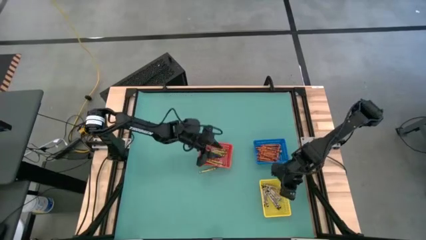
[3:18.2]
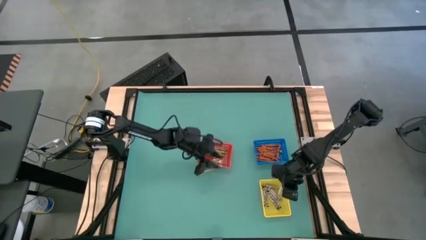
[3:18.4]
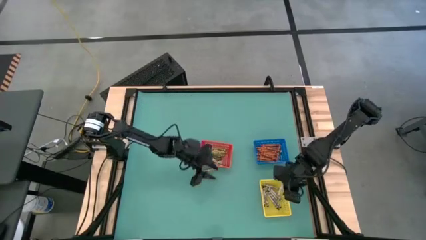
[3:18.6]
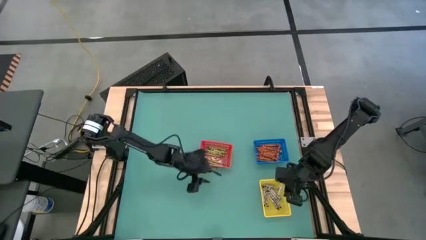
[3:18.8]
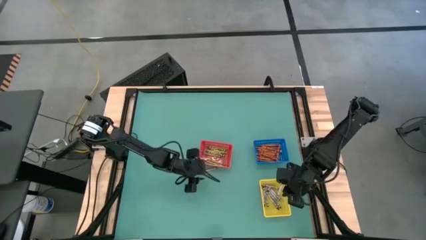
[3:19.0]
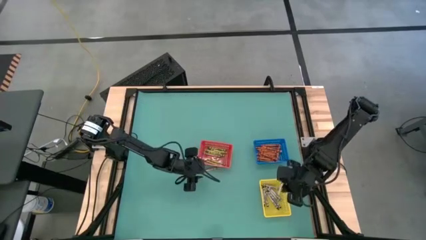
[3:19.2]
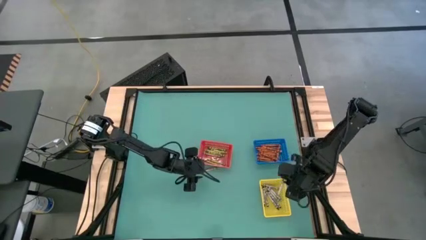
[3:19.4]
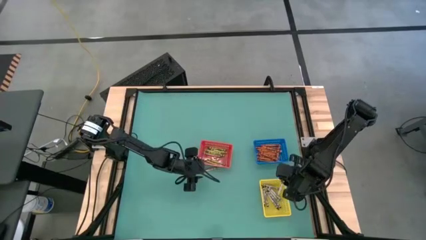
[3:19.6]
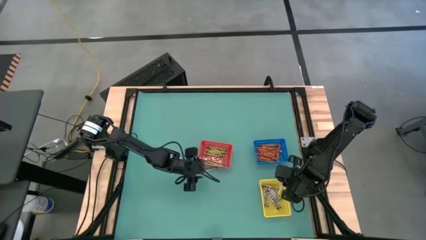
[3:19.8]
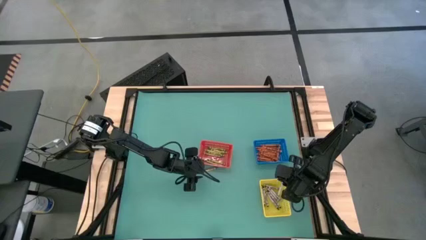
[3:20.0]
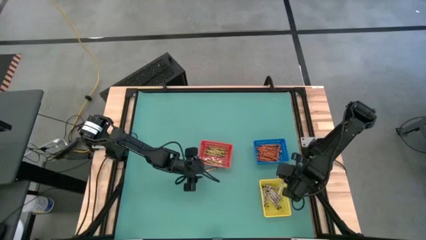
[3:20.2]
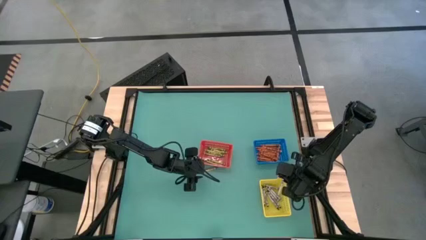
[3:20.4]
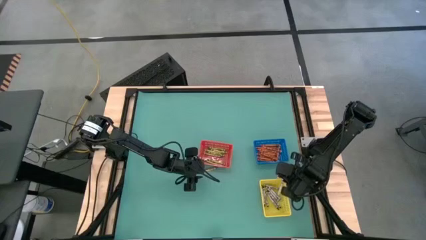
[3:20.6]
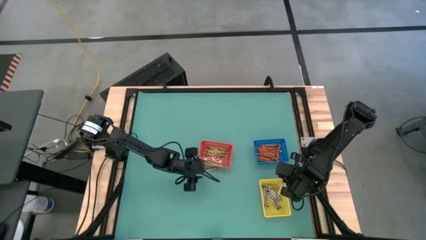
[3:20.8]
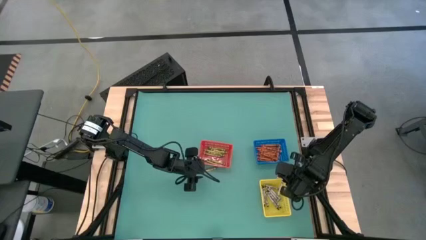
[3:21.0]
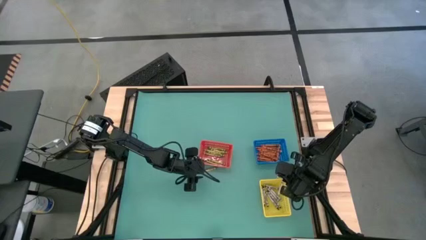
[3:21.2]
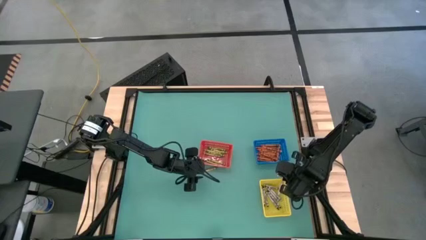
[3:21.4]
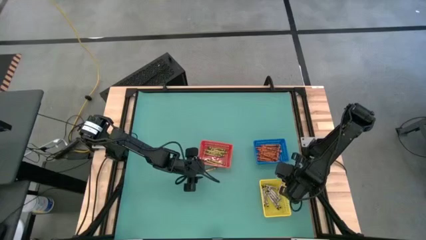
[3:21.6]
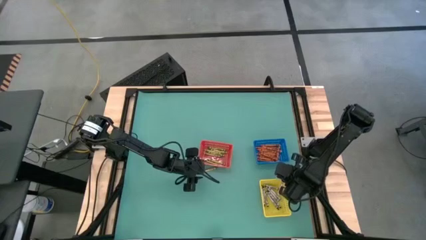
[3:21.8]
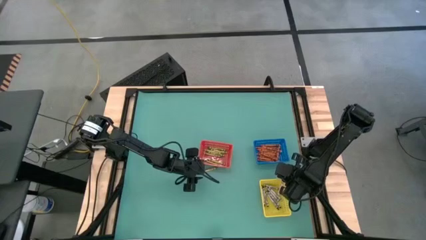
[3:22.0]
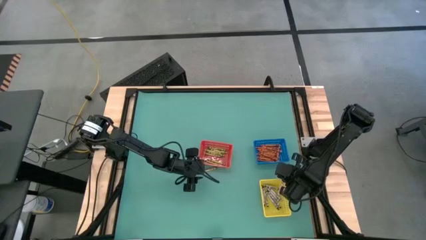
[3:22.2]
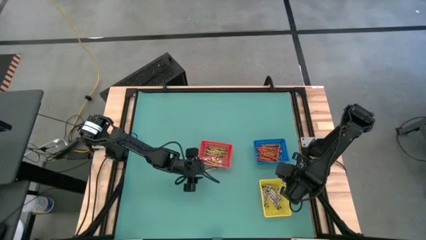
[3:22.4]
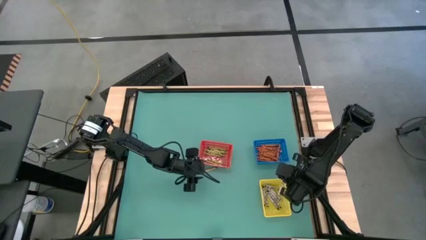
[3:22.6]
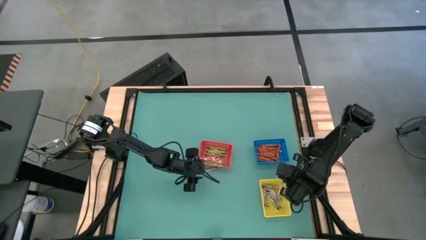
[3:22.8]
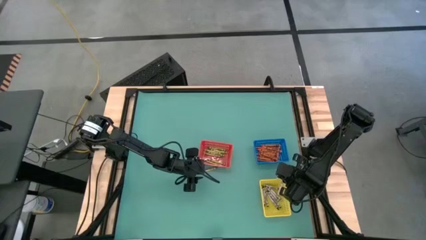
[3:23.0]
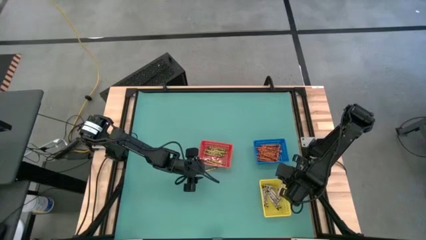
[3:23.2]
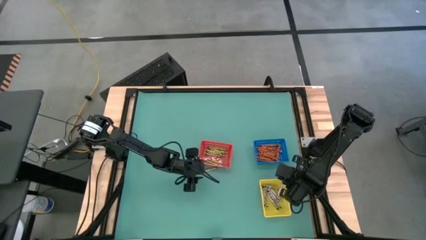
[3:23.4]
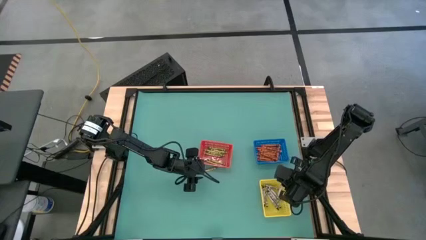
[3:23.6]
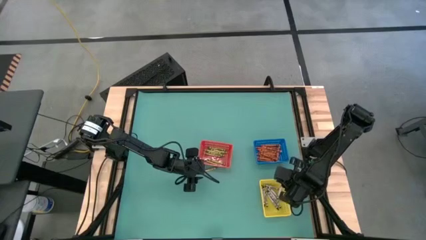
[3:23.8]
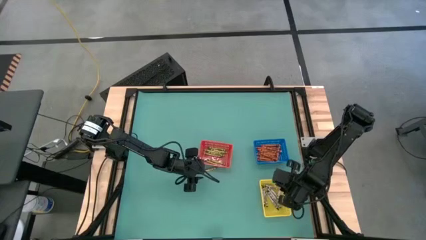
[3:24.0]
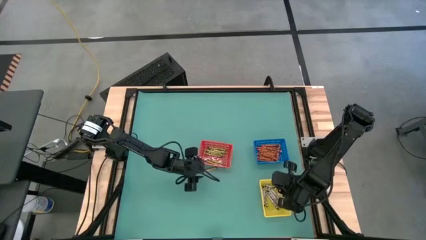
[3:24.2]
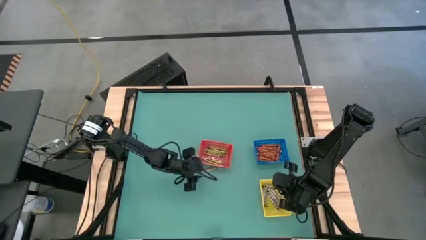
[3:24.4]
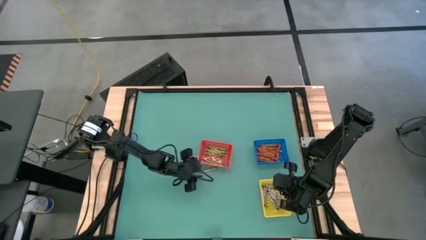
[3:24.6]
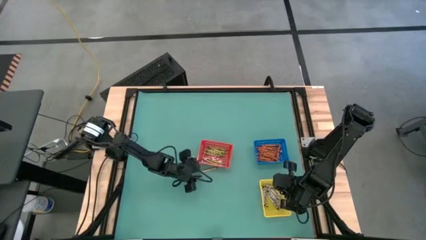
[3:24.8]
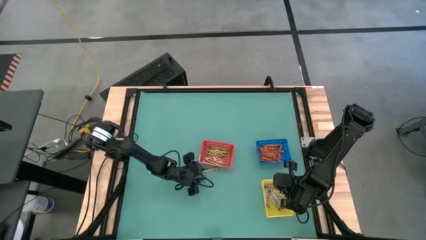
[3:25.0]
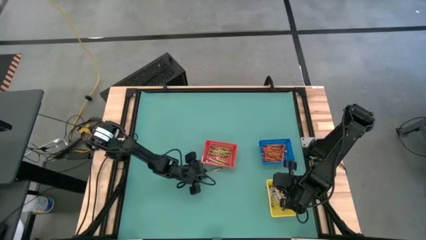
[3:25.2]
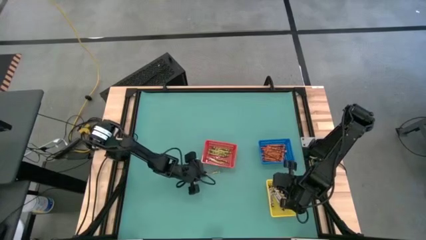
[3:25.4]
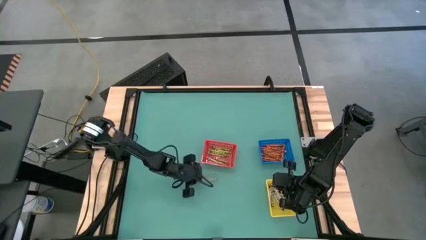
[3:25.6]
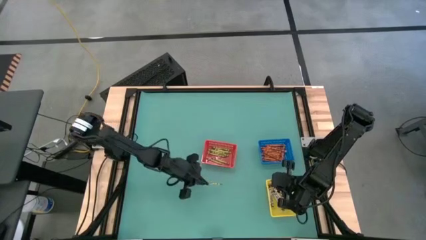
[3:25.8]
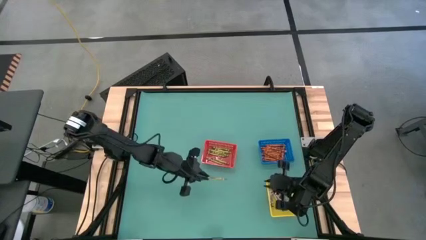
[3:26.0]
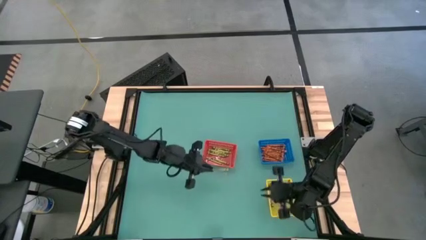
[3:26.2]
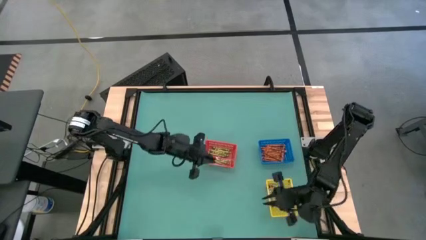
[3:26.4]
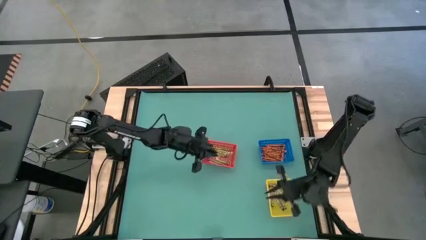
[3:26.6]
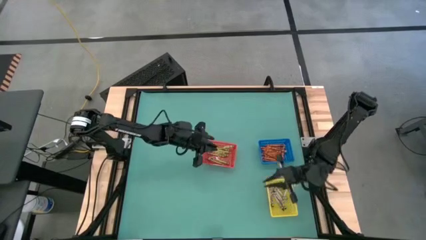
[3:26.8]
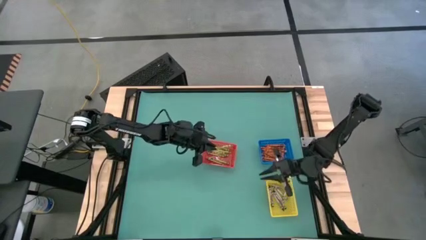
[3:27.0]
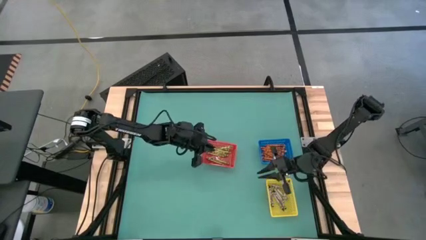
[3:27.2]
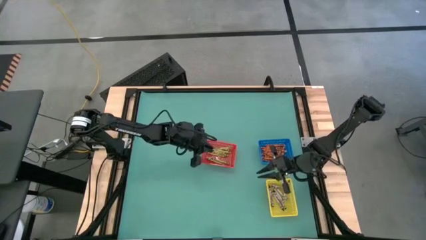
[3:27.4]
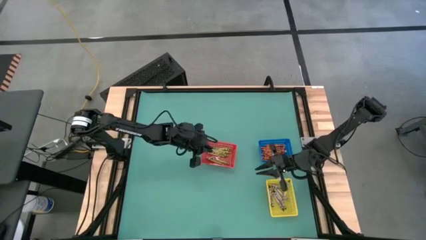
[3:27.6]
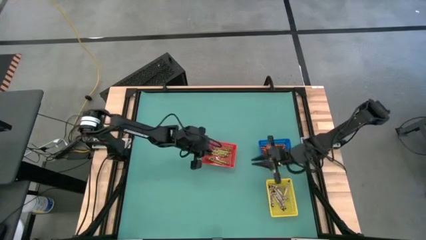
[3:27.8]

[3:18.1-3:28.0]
Task: Sort crayons
Put the green crayon into the red basket

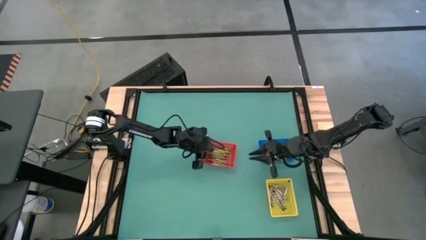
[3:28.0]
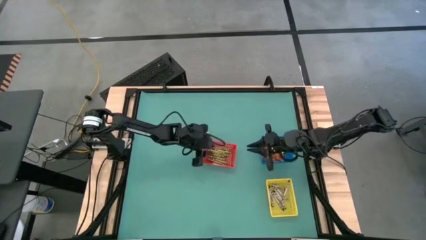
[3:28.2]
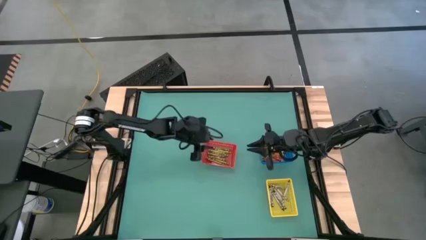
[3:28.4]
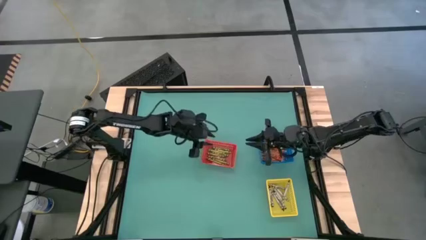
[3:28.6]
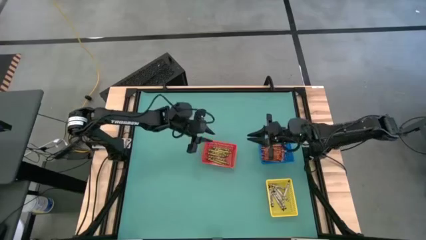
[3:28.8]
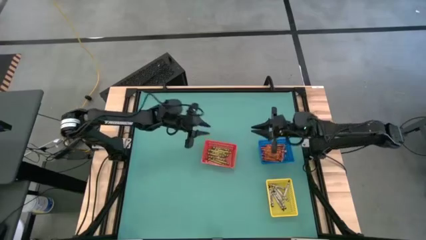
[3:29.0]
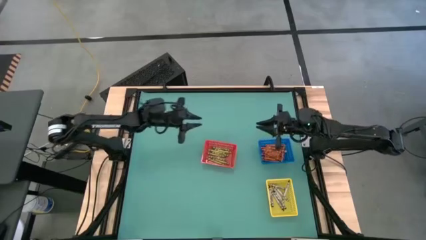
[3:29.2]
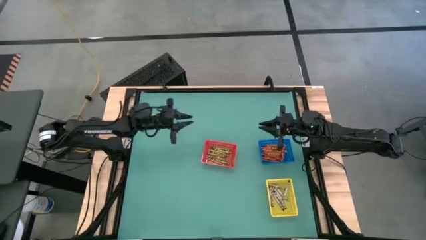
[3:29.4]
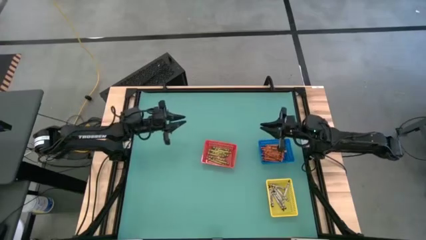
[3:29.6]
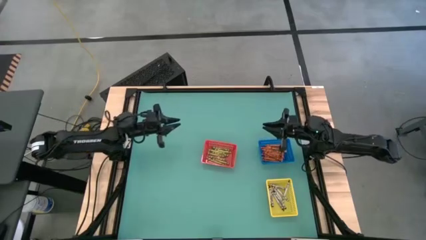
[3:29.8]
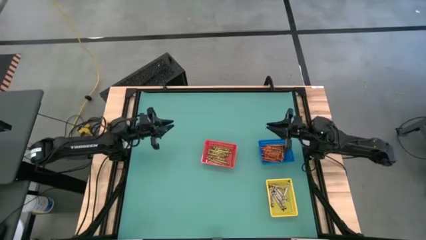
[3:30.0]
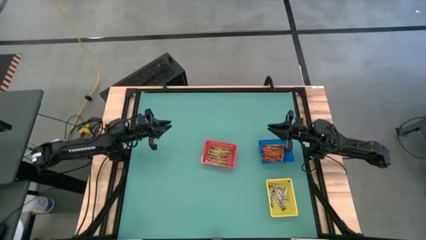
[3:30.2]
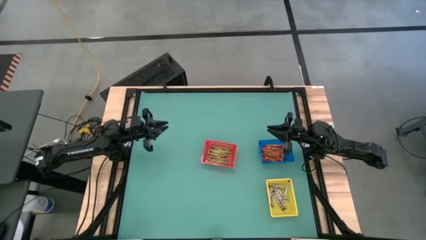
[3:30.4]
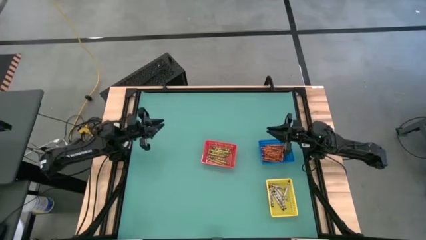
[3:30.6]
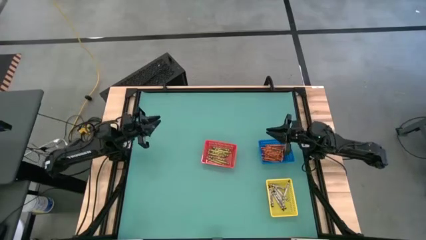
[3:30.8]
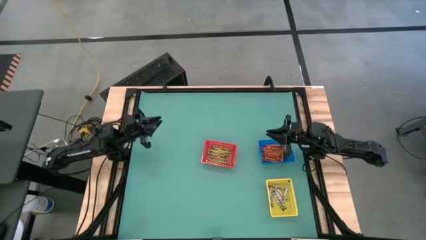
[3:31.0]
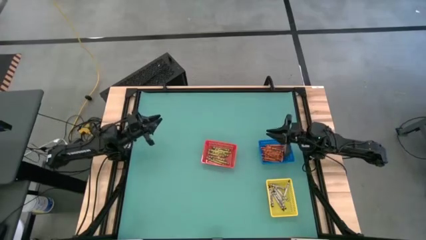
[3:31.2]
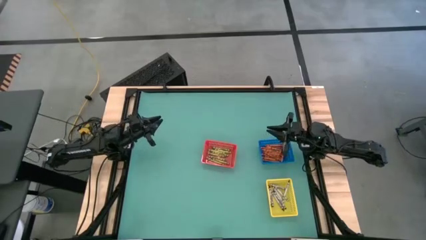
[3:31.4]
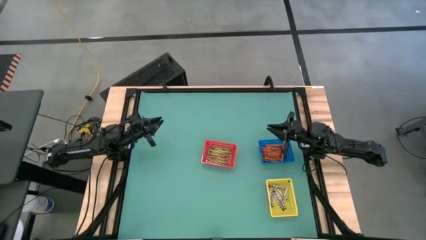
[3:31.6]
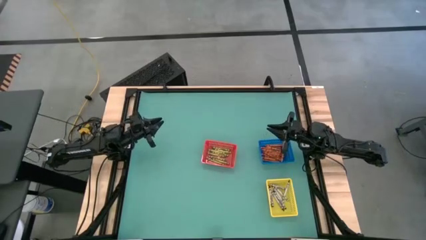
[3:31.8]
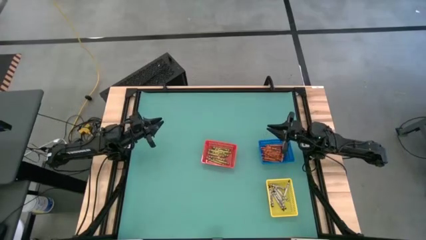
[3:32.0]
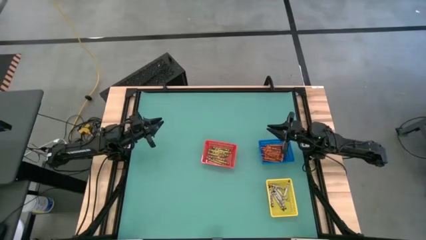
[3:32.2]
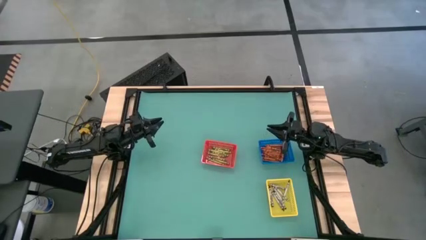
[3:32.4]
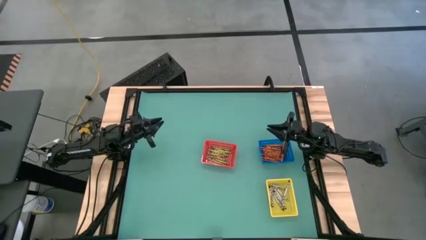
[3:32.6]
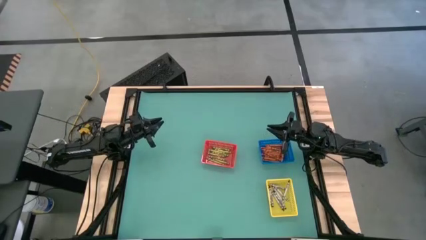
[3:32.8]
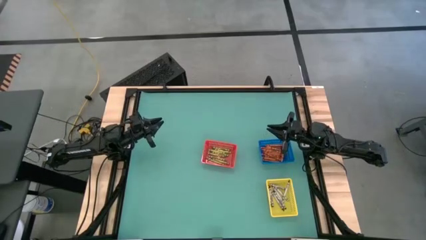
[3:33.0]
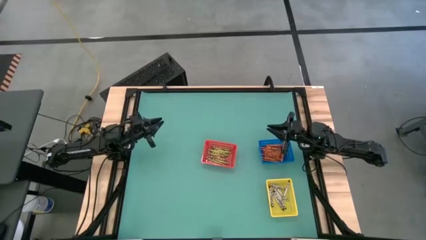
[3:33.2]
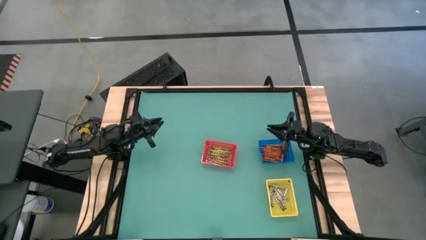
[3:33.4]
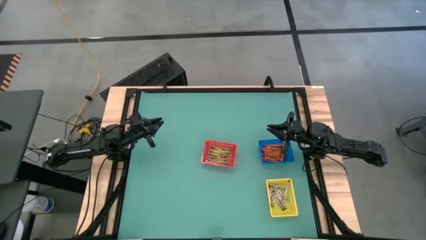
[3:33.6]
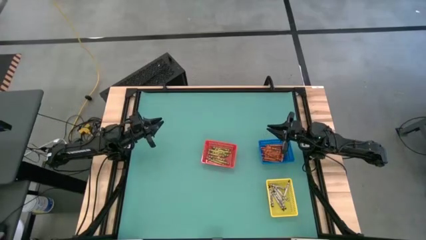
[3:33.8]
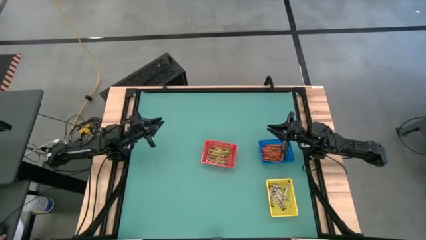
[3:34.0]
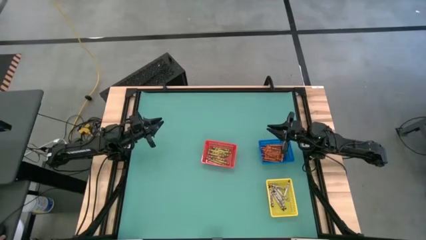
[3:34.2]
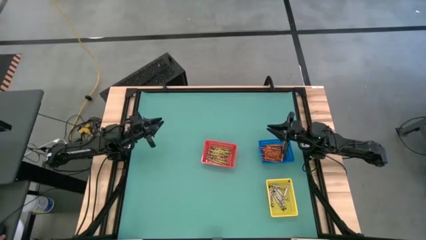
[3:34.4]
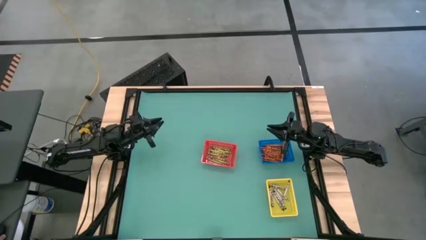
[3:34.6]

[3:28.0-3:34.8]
Return to Home Position
